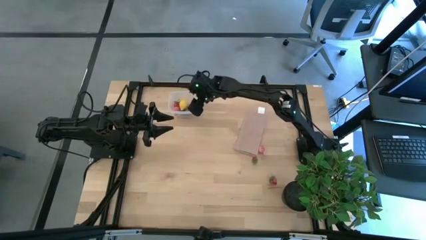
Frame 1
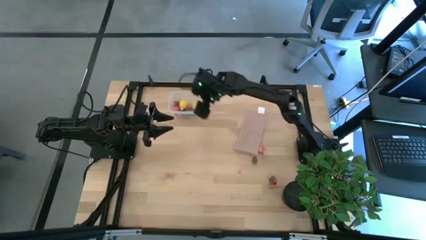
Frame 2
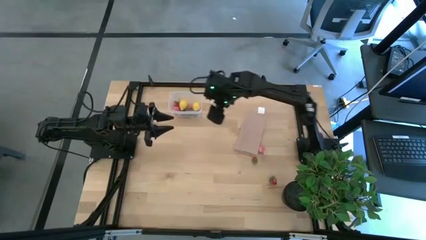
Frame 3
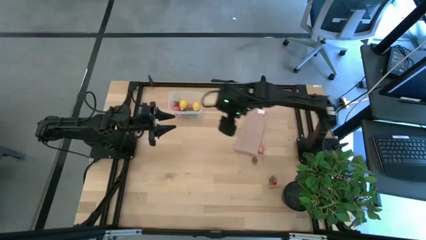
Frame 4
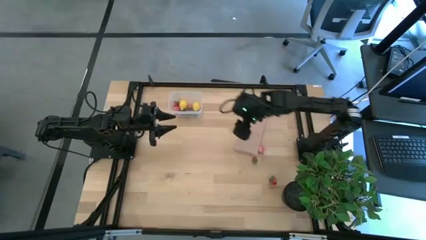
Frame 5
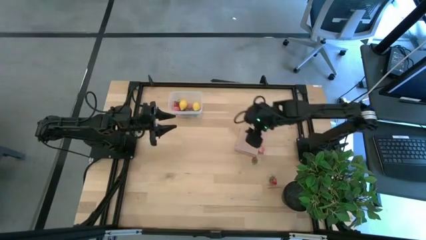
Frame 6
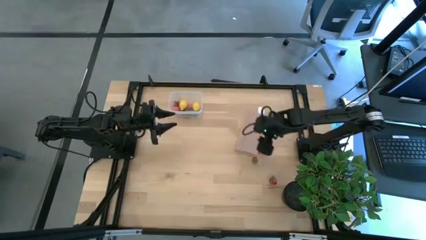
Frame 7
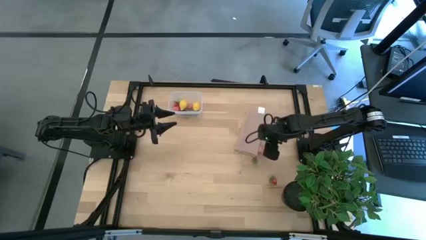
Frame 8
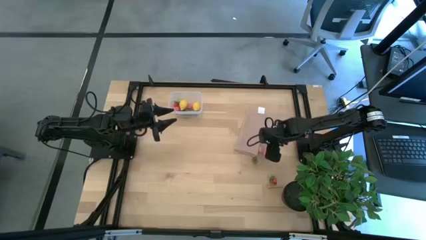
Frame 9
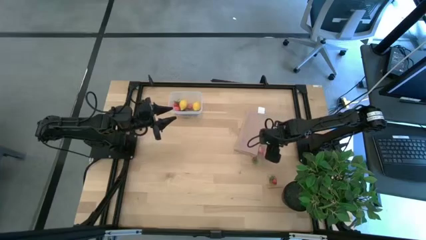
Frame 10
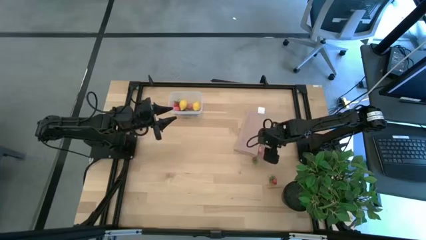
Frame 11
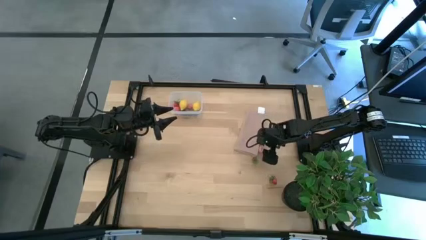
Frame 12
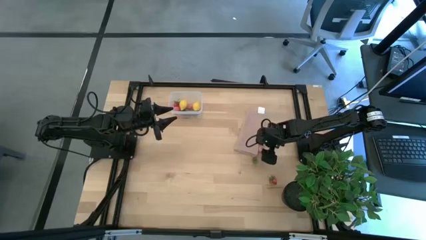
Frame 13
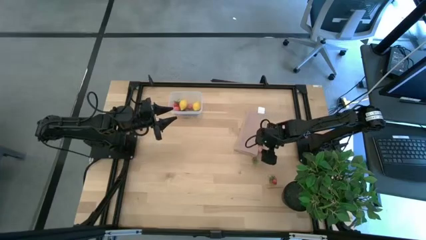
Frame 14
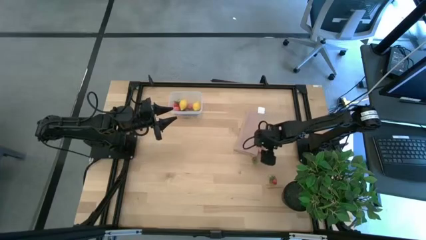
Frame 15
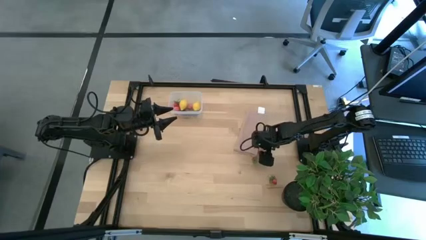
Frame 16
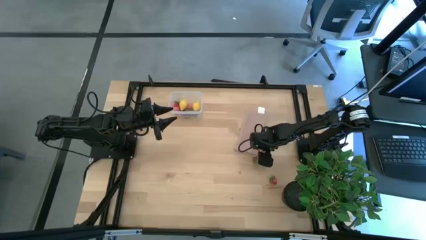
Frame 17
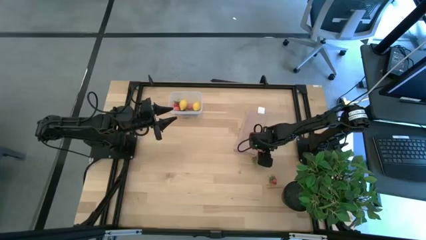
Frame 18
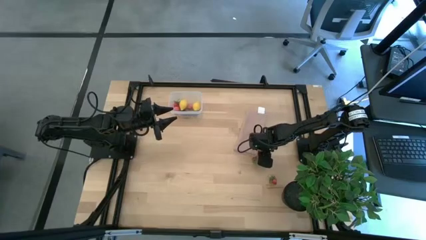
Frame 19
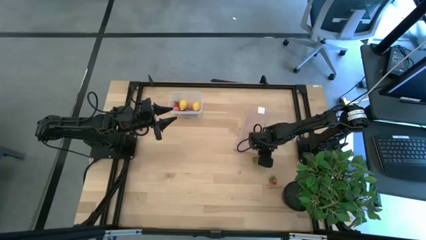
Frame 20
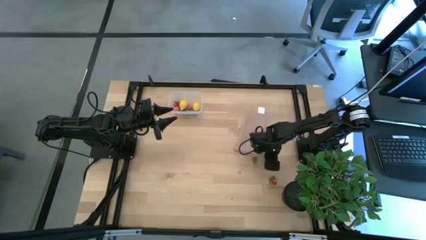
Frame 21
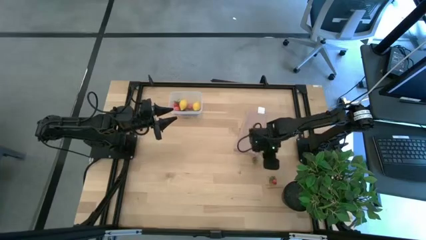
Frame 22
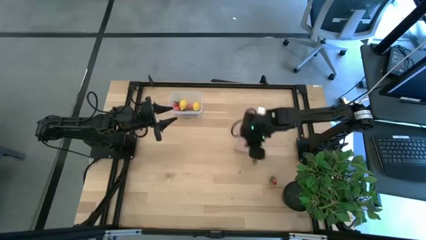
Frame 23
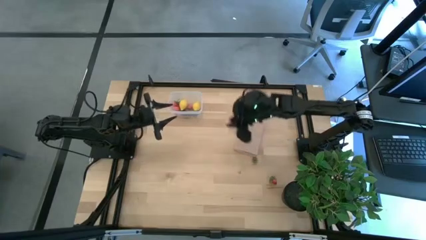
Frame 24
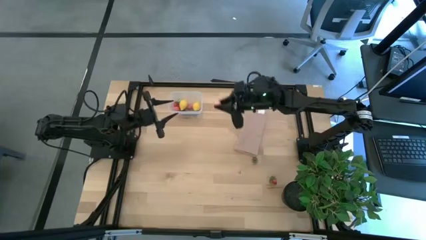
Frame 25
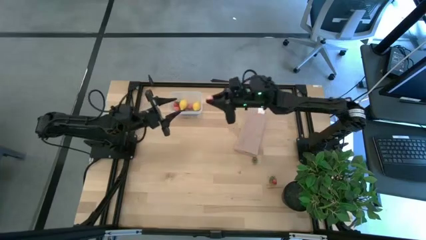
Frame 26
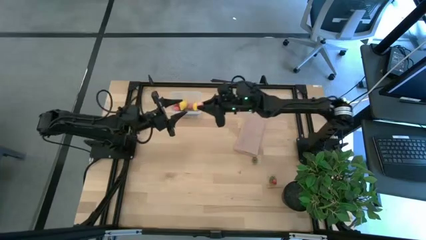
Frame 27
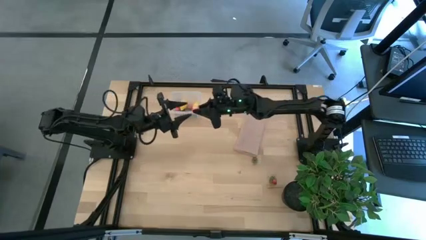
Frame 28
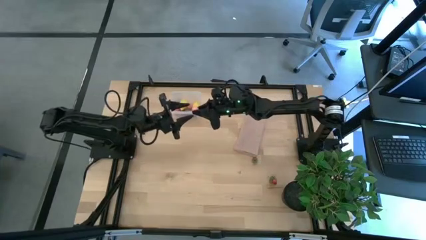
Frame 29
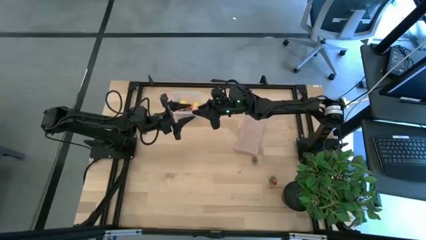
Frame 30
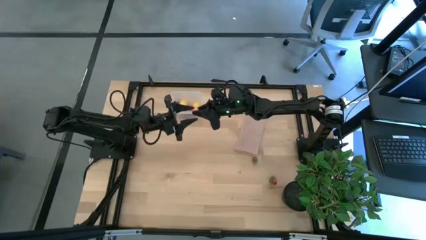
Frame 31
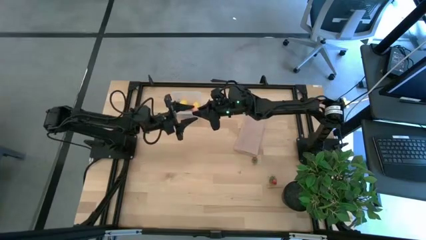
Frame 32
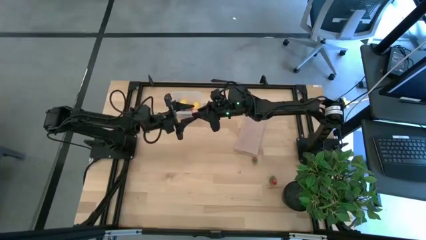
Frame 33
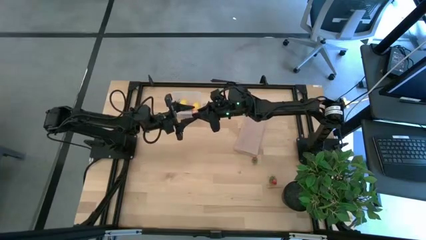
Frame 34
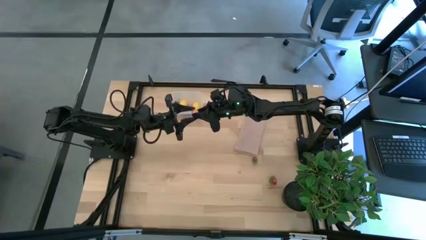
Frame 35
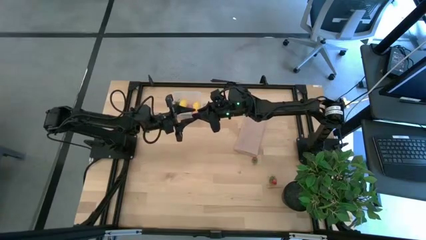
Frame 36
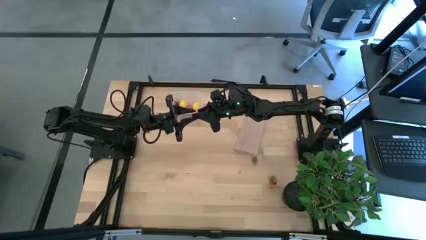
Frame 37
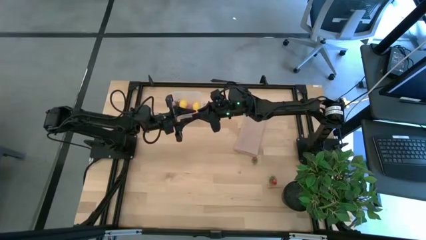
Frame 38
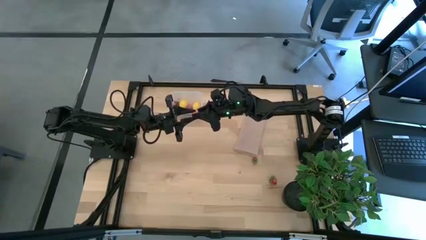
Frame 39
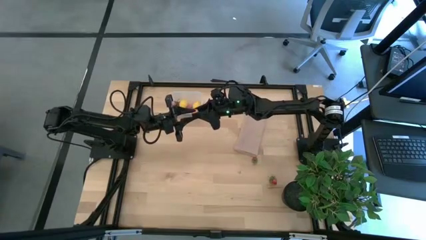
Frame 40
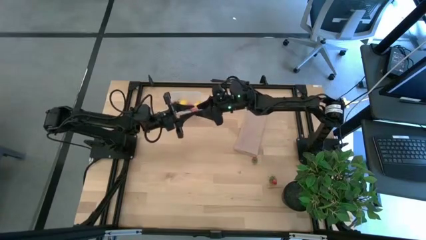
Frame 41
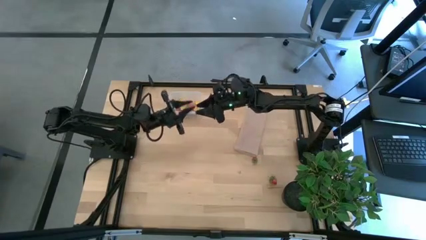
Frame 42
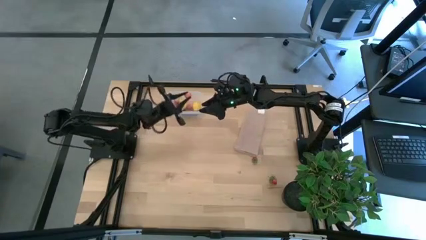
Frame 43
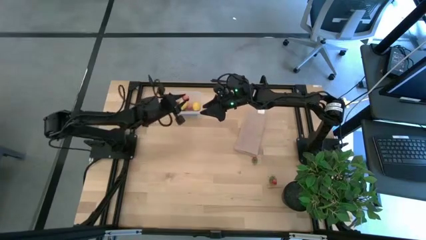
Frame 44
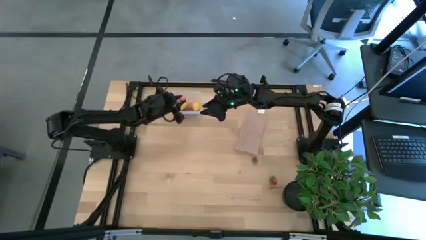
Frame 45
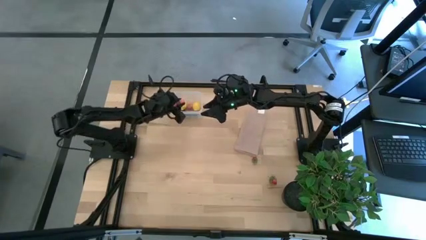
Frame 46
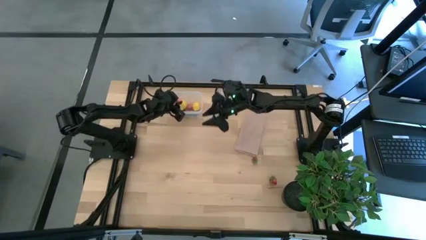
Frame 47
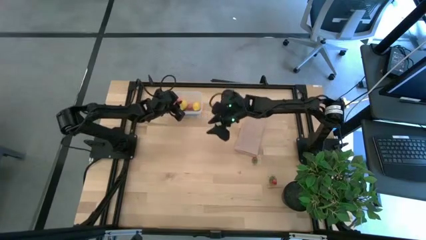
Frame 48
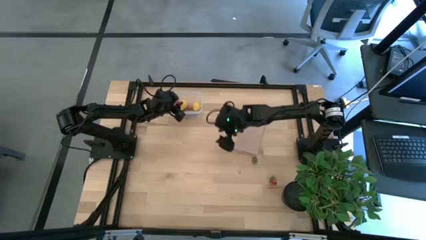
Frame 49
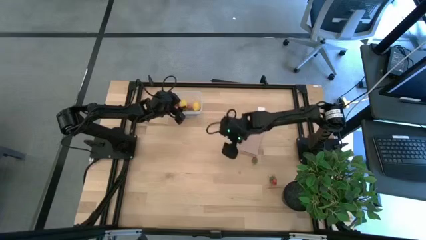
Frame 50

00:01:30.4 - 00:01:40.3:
Task: Pick and placing Produce into tupperware
Put the peach into the transparent bin

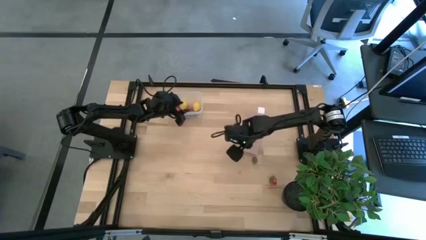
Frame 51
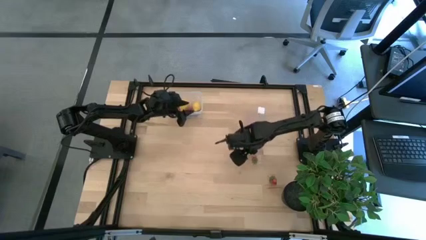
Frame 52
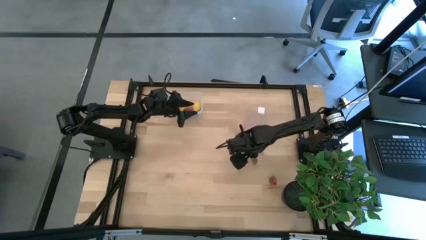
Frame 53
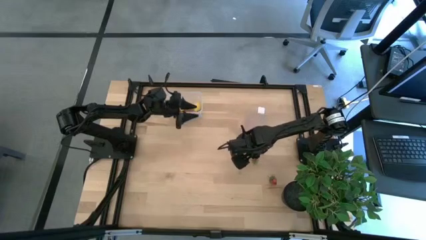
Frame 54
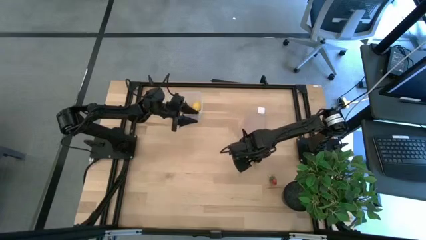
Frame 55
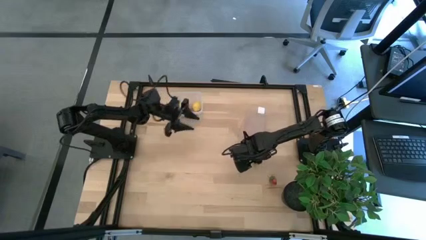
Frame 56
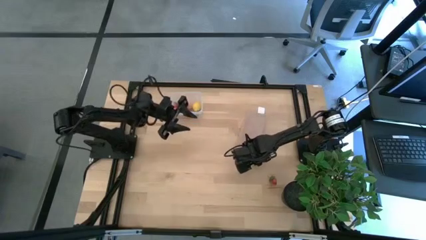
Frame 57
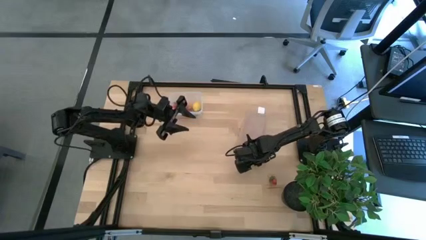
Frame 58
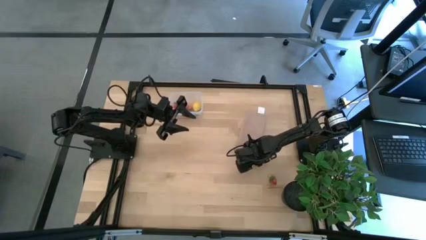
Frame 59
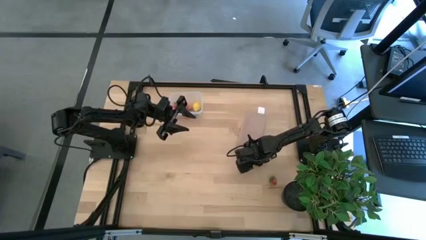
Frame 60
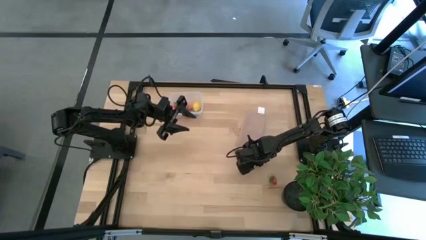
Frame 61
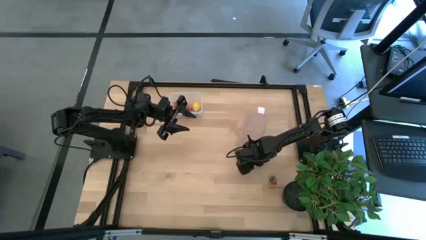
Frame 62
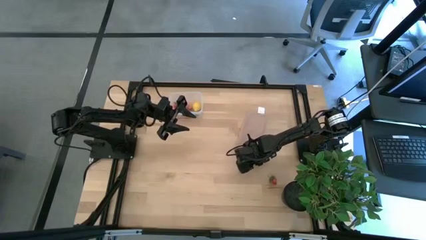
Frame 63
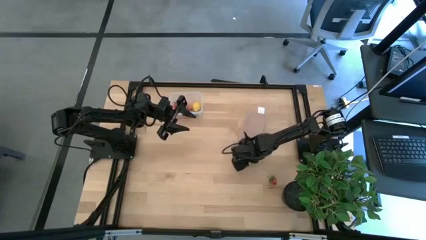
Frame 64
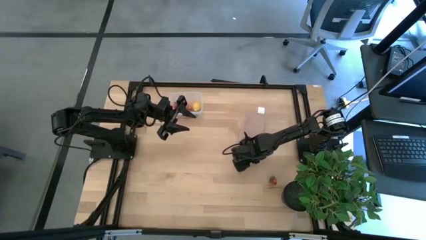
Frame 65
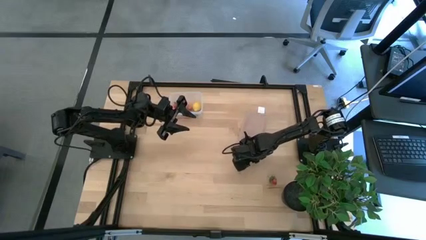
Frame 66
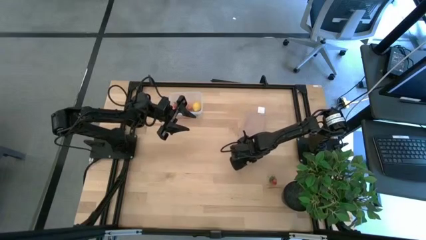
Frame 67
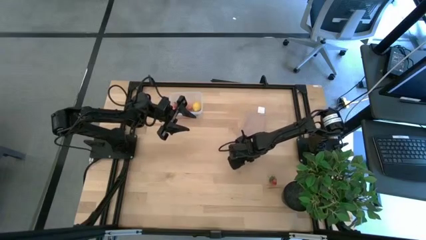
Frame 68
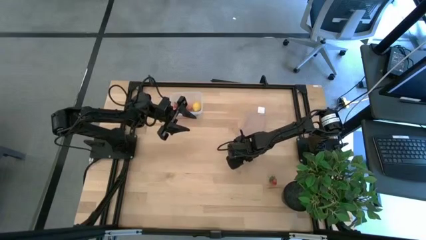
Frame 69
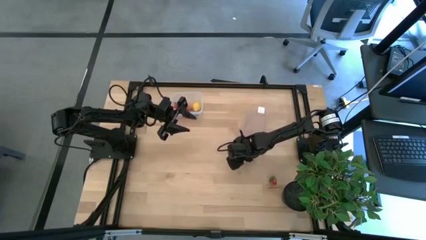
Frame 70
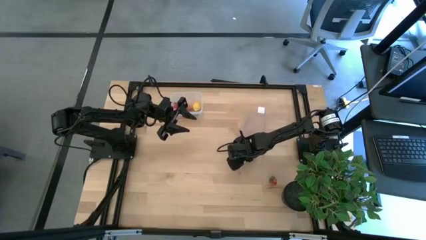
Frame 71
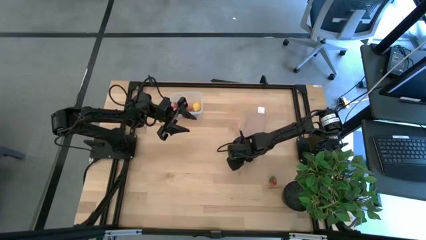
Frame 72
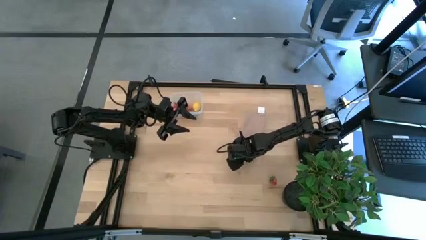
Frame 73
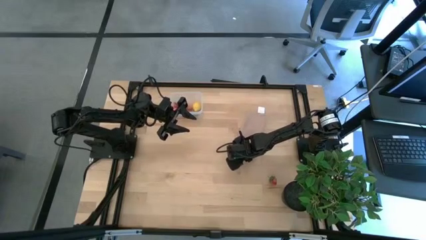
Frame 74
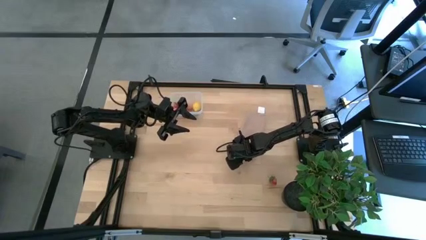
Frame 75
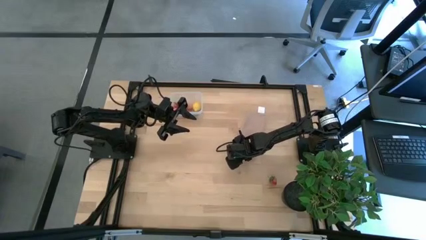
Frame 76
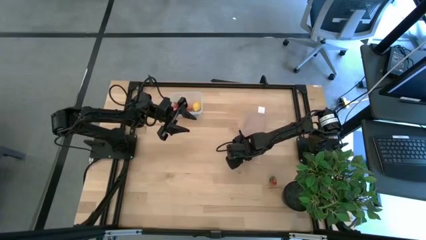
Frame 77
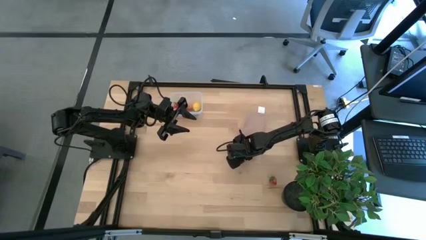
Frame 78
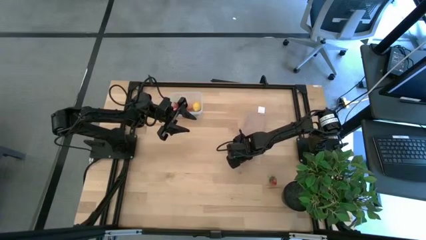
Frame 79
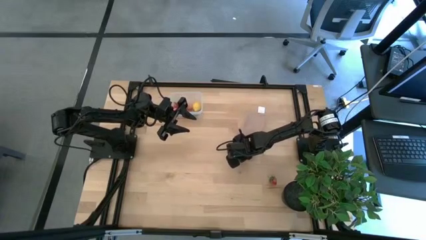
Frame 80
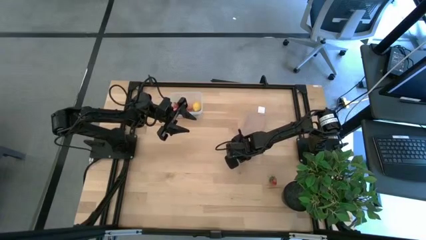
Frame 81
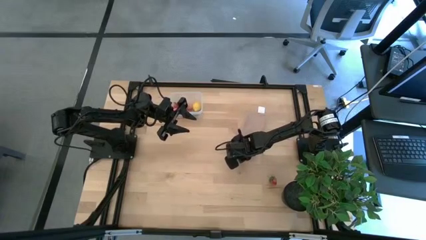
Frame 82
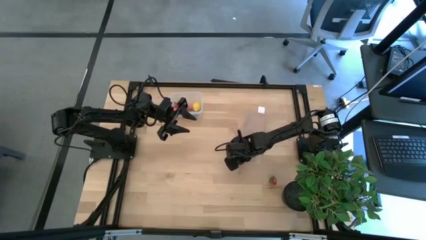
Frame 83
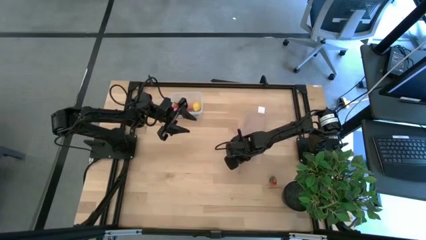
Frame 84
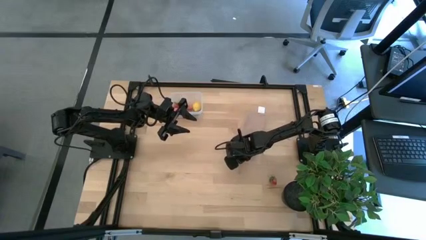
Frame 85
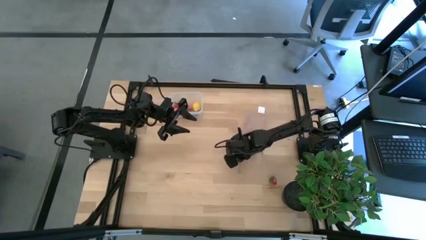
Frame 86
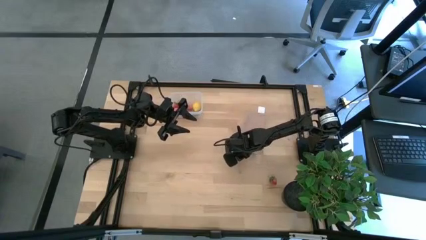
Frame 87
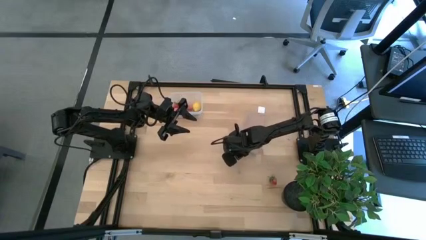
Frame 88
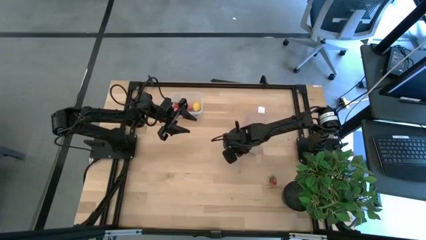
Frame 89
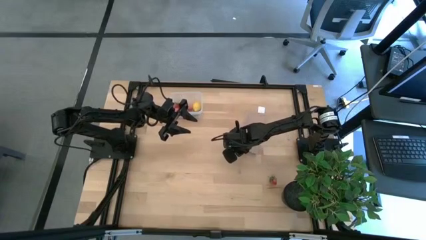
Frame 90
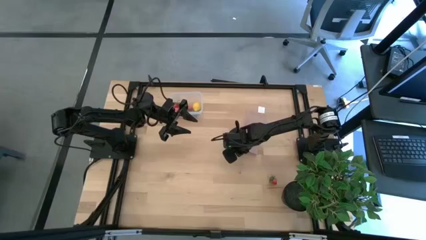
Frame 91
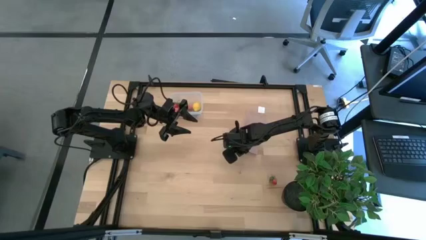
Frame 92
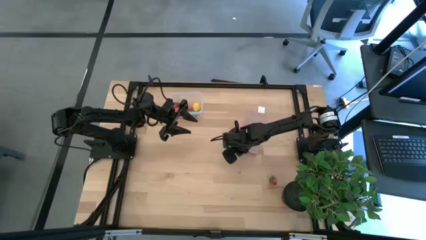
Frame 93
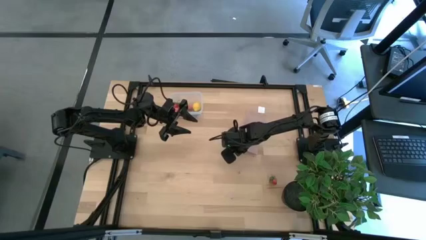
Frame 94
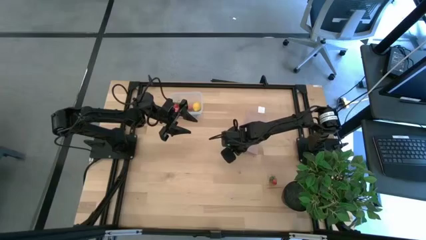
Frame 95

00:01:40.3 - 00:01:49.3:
Put the strawberry into the transparent bin
